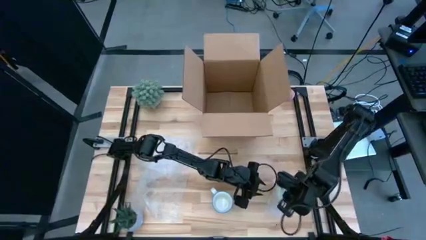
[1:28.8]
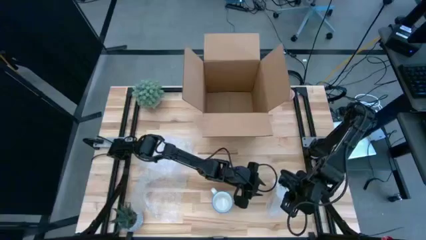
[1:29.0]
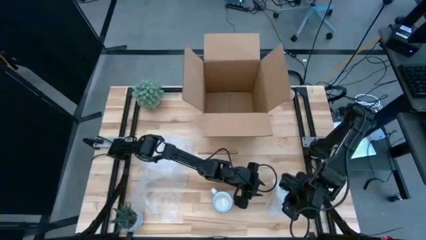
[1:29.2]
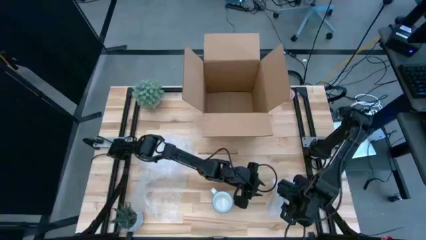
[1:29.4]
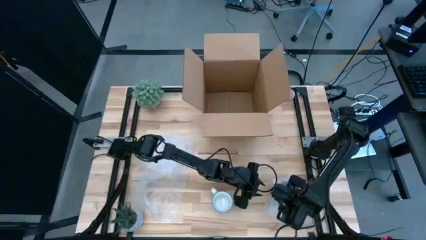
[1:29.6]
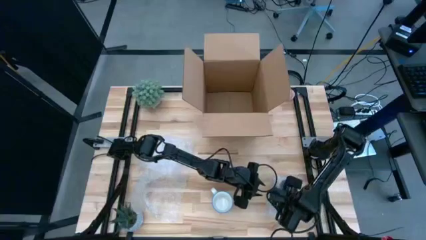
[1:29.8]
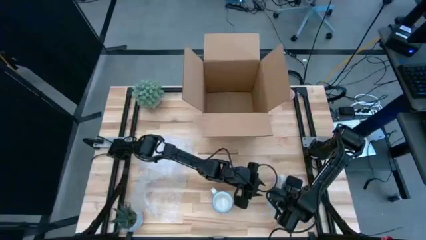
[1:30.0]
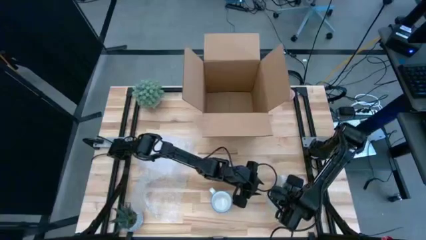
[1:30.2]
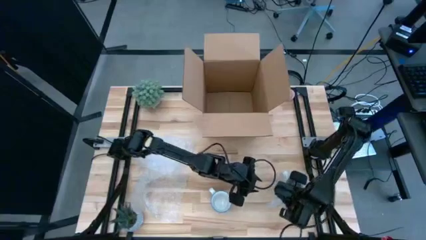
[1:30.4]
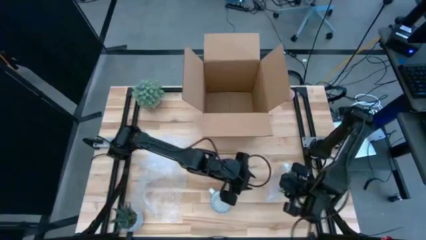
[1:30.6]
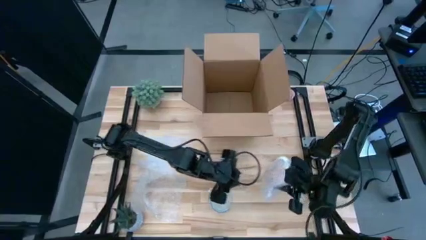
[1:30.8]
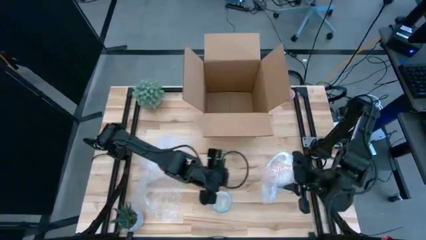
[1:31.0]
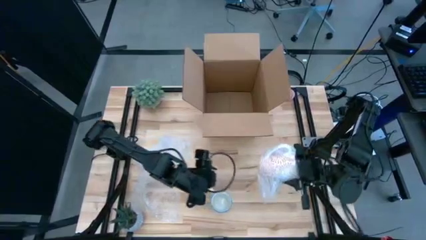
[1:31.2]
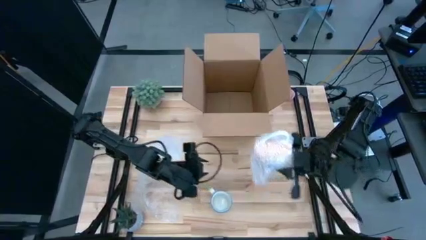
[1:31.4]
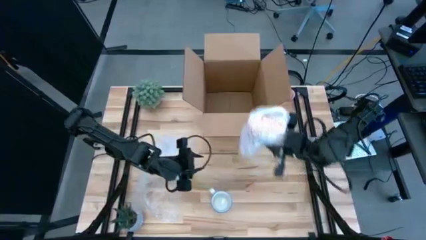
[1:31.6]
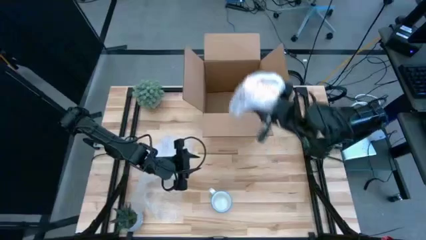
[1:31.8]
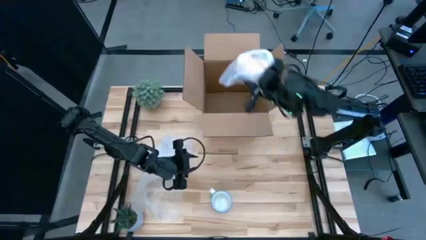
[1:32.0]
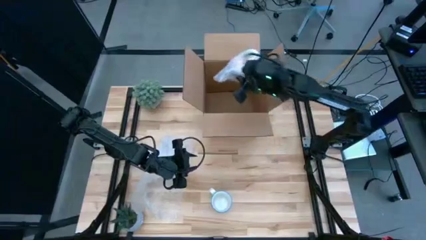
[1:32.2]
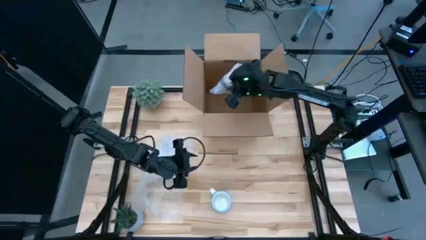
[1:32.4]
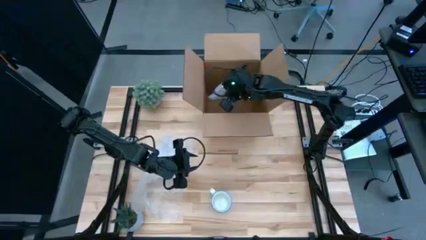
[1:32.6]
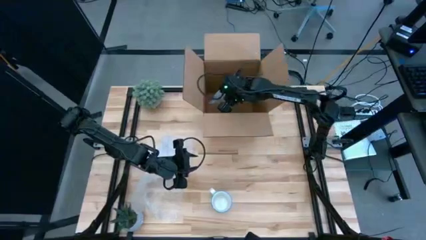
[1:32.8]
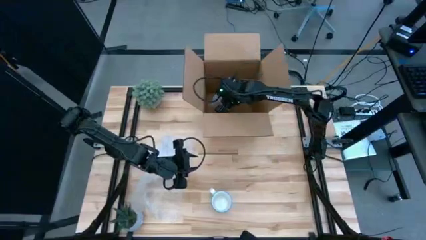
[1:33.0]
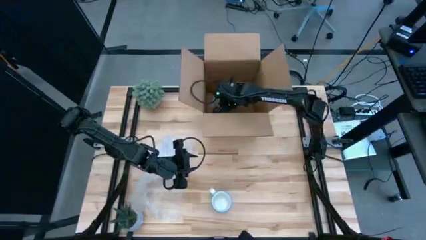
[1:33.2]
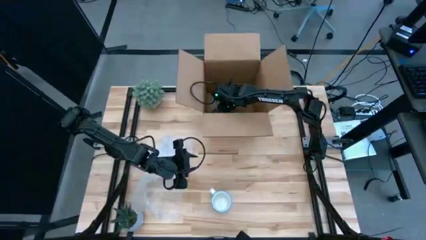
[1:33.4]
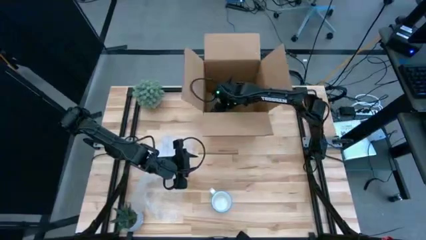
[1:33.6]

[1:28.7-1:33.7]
Task: wrap mug
Put the wrapped yellow mug into the box

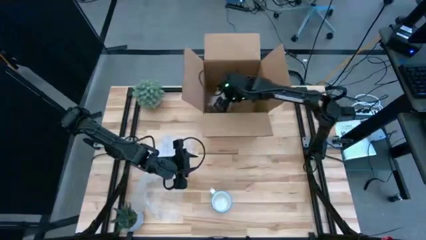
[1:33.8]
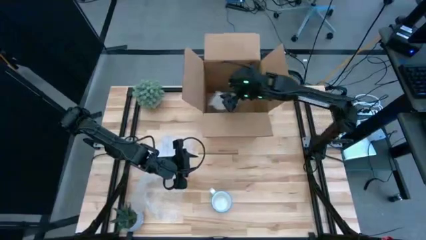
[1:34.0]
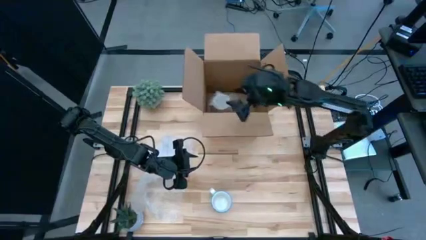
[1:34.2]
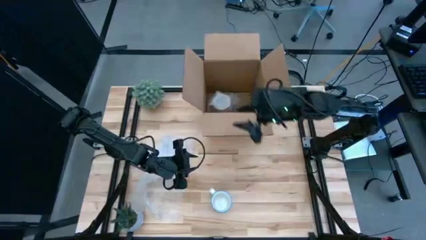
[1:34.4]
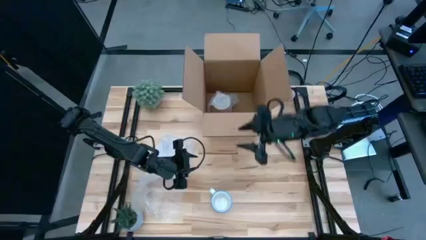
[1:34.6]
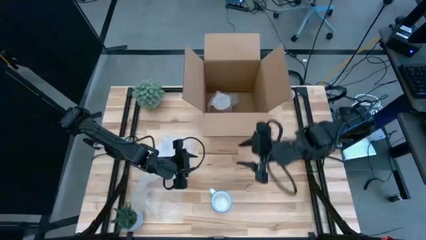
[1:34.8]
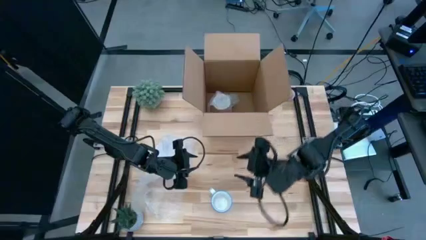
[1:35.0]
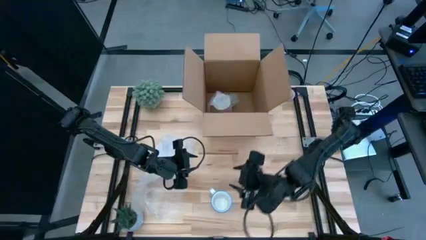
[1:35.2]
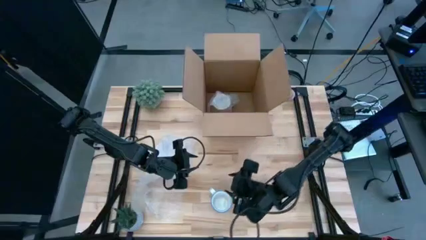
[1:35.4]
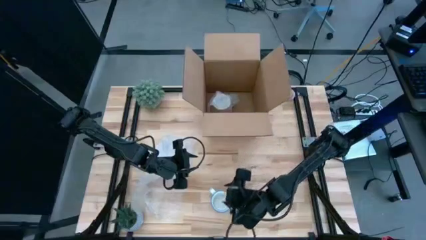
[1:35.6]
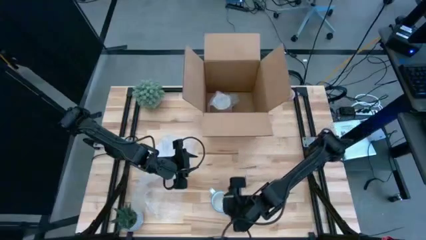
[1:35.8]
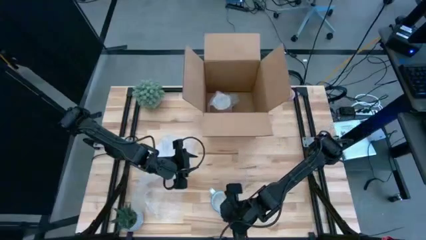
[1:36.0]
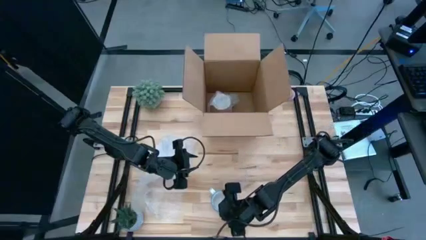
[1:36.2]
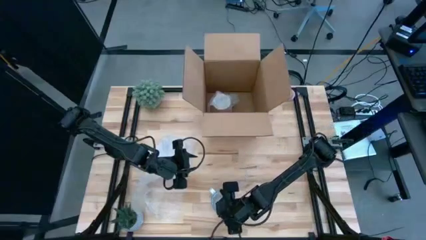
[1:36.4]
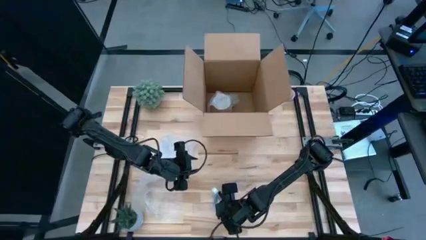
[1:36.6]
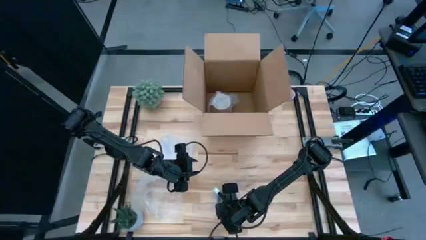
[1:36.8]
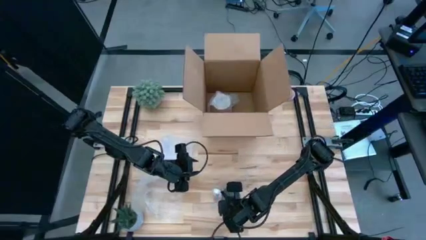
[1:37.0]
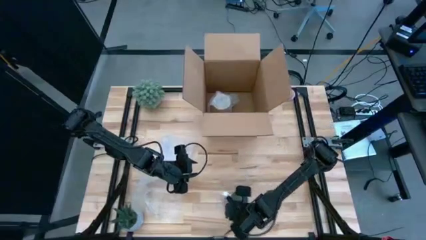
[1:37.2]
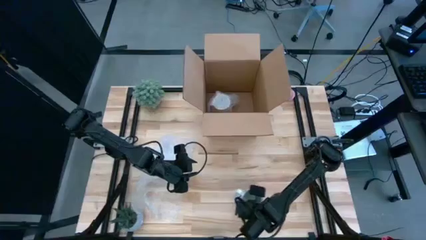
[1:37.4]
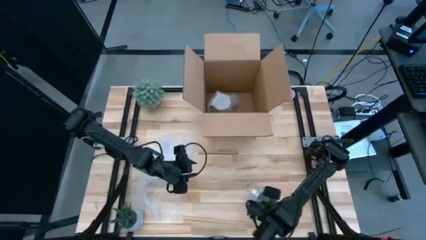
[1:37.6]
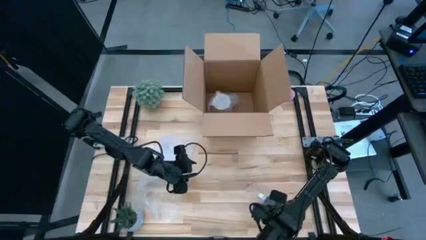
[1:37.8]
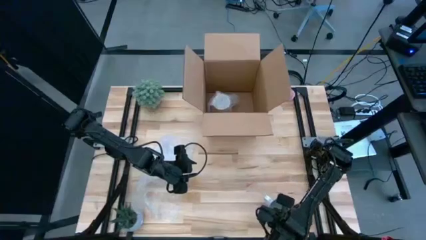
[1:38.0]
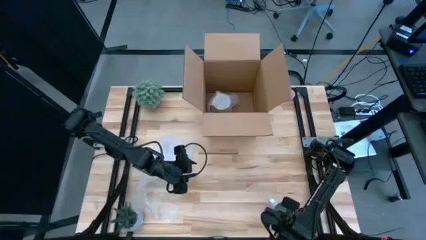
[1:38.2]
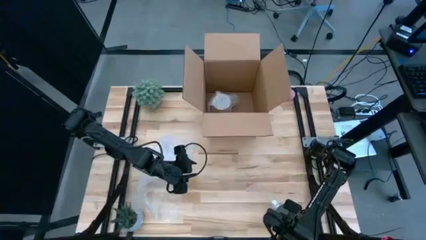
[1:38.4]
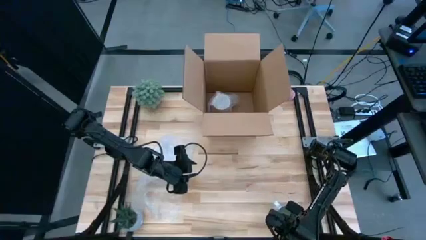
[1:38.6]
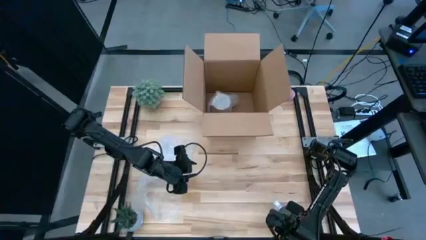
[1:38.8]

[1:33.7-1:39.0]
Move the red mug on the right corner of the table
